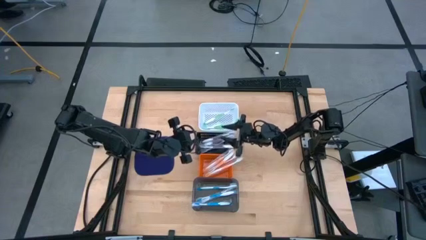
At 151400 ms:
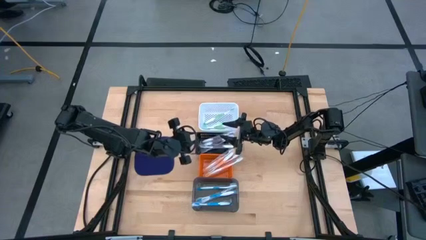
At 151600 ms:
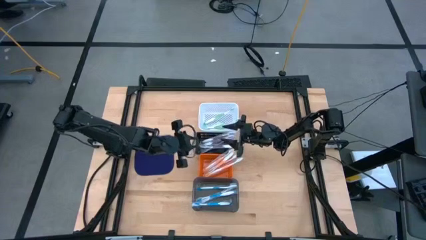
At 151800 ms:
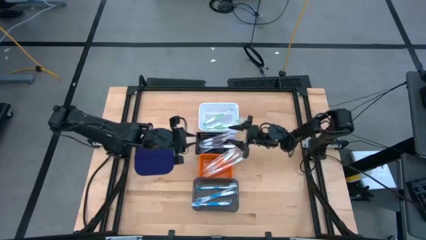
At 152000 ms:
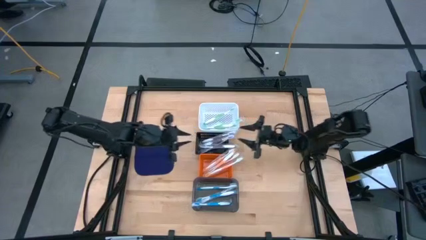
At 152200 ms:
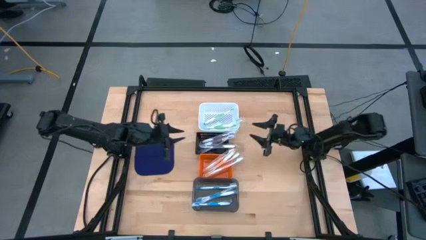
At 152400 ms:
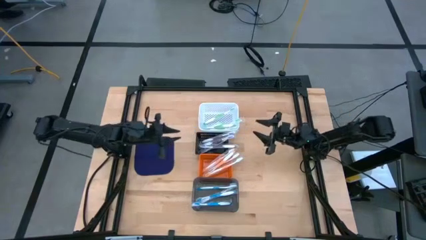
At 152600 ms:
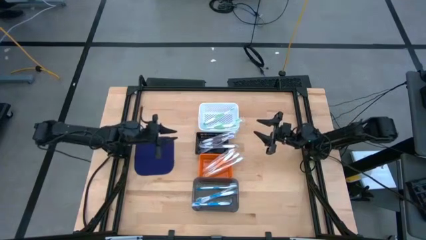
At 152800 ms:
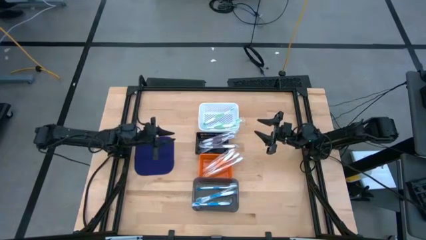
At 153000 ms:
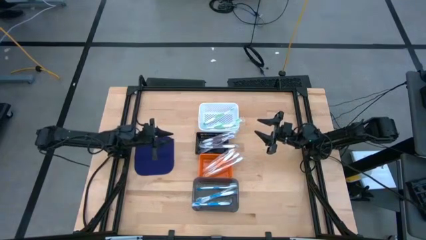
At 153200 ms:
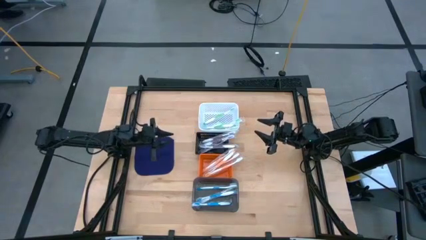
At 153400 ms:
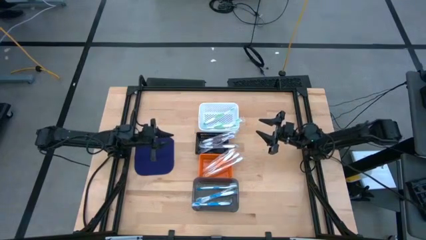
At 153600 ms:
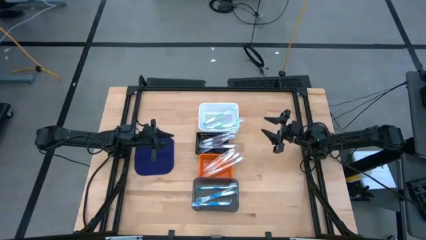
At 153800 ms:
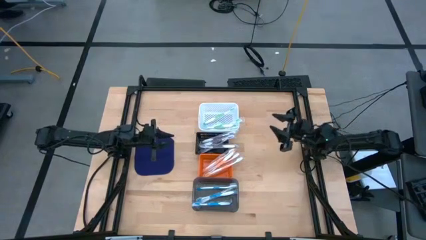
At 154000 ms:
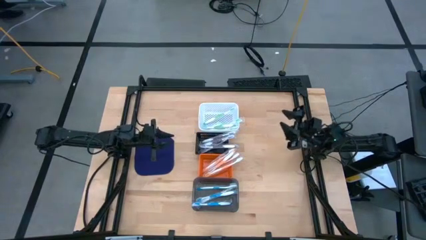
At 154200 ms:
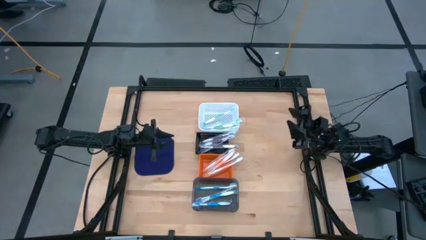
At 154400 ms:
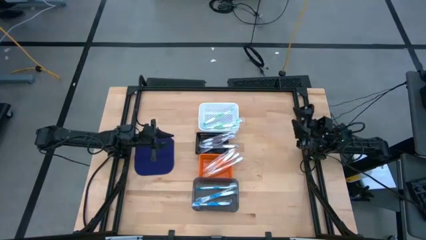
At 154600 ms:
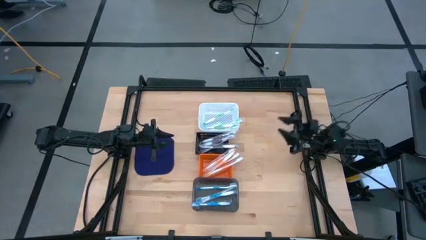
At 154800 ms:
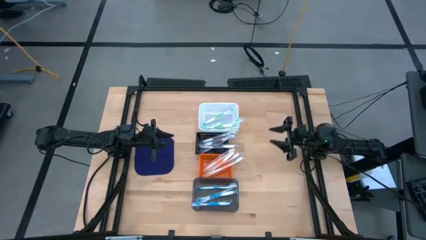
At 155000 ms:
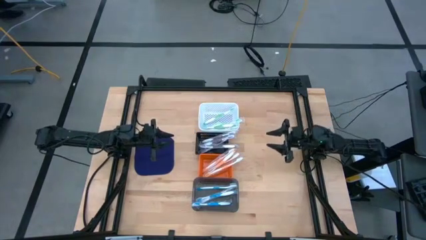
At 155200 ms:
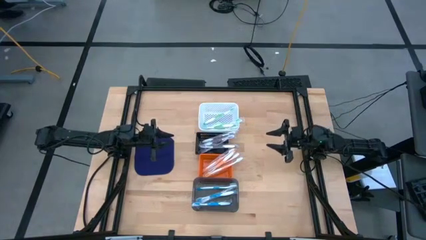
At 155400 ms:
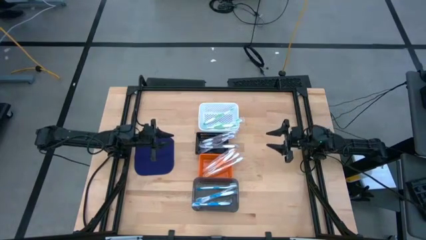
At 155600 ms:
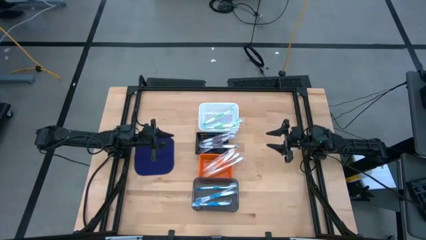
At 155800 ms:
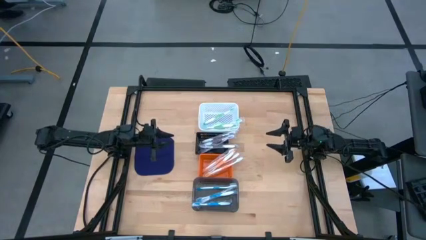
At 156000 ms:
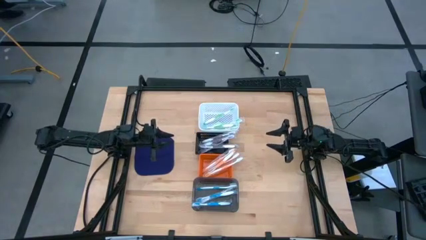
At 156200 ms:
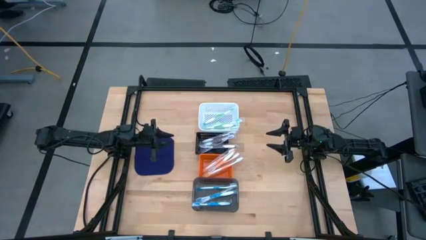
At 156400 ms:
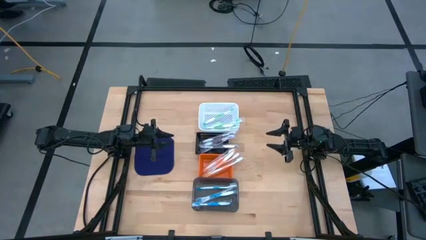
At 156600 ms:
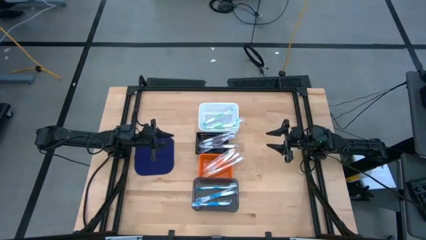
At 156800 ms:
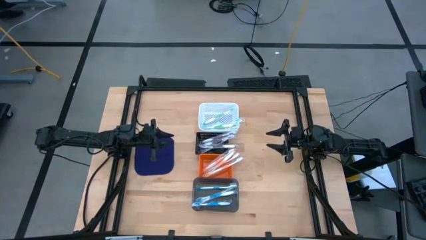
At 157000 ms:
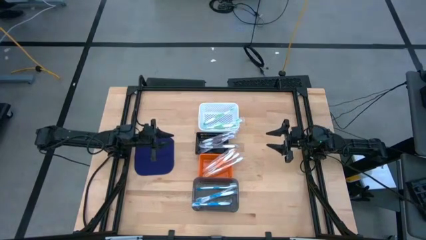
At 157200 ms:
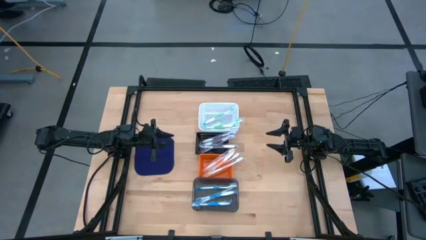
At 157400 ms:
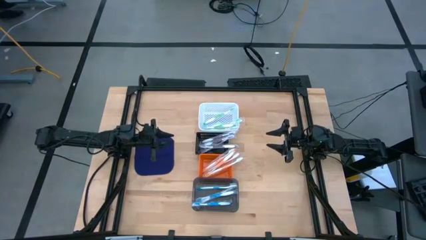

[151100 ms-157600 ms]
Task: Pick & Place Toothbrushes
Return to Home Position

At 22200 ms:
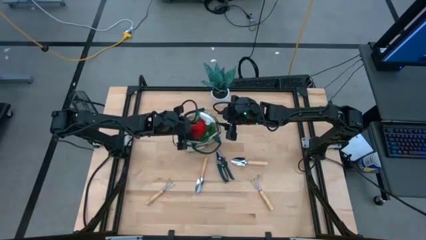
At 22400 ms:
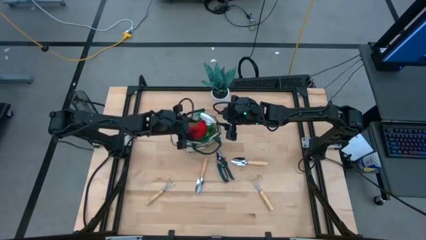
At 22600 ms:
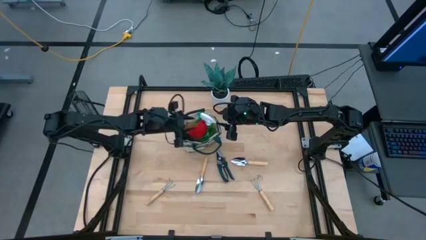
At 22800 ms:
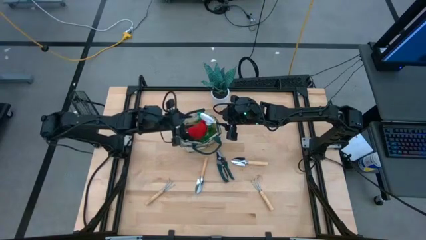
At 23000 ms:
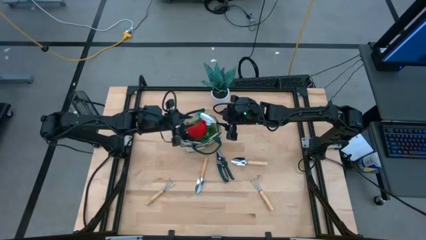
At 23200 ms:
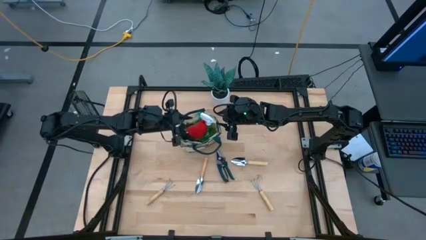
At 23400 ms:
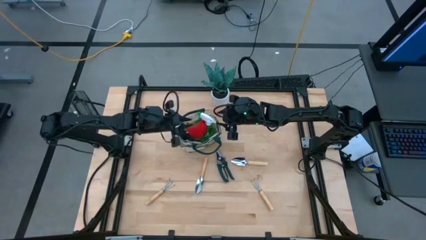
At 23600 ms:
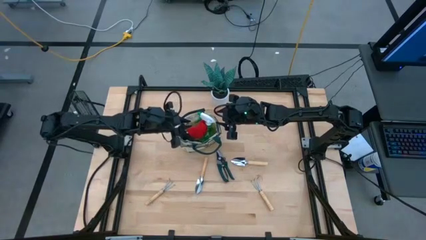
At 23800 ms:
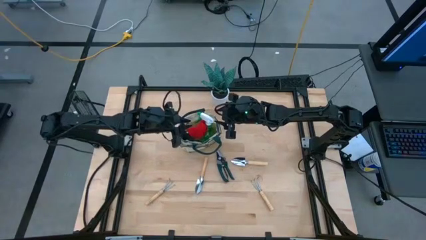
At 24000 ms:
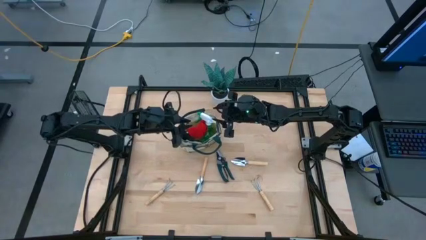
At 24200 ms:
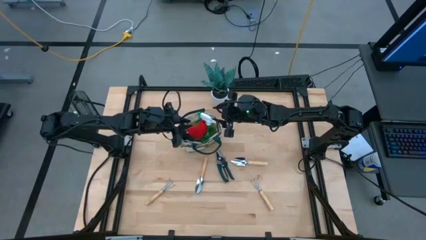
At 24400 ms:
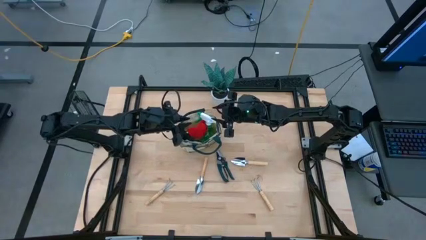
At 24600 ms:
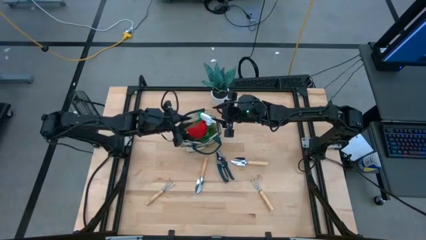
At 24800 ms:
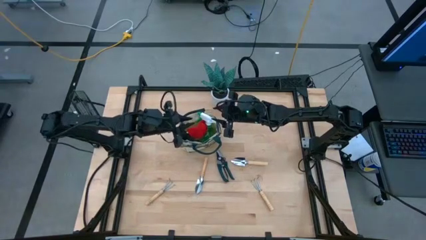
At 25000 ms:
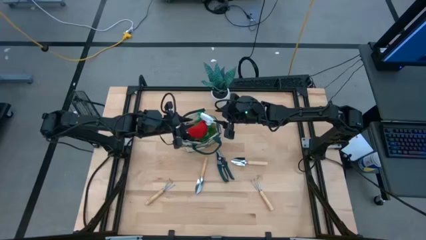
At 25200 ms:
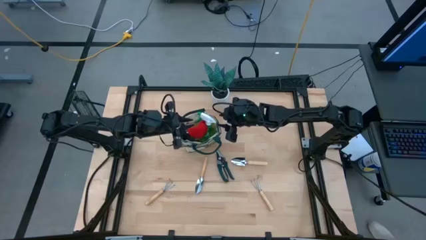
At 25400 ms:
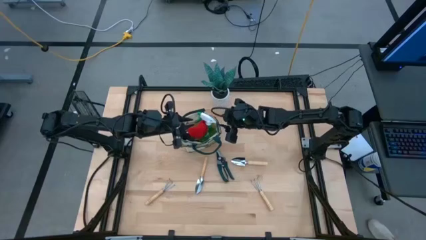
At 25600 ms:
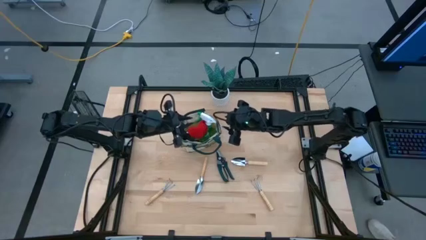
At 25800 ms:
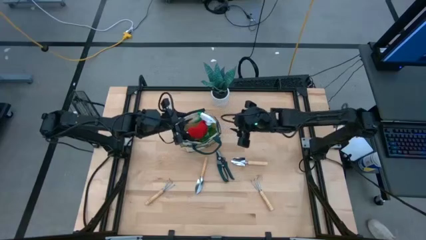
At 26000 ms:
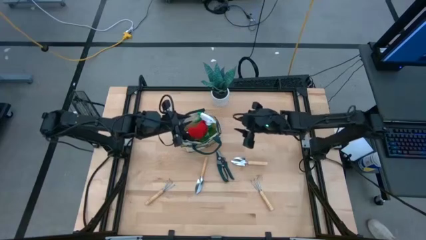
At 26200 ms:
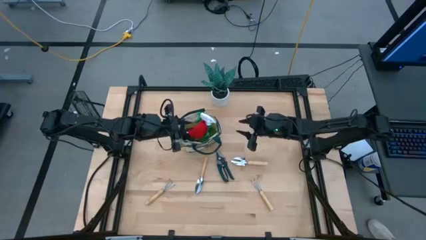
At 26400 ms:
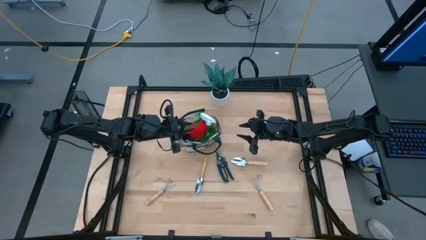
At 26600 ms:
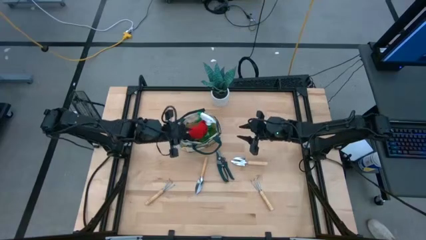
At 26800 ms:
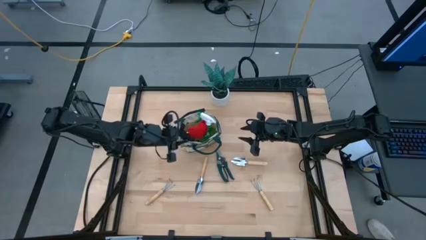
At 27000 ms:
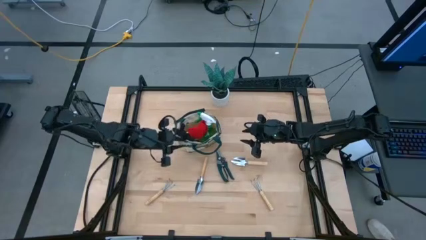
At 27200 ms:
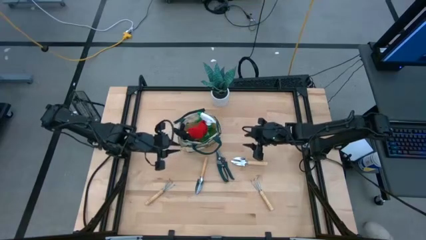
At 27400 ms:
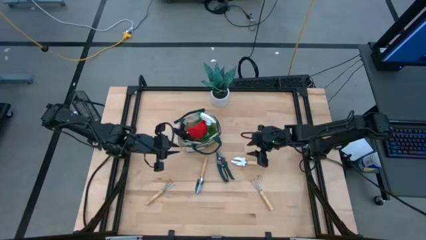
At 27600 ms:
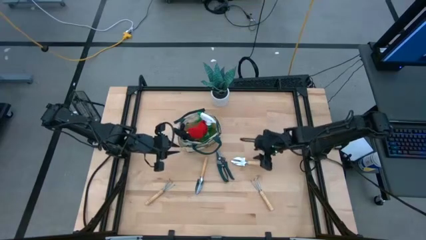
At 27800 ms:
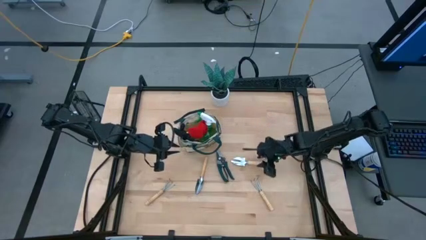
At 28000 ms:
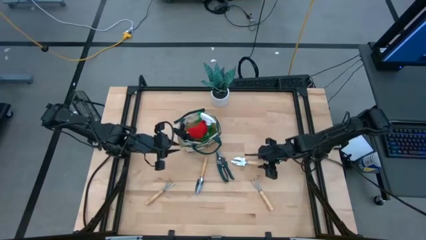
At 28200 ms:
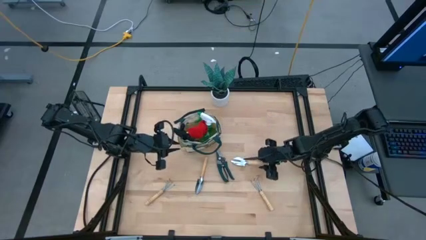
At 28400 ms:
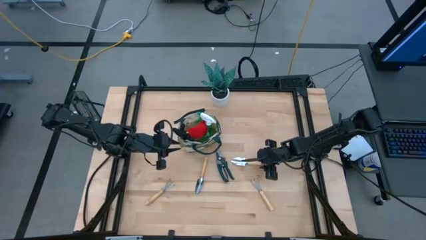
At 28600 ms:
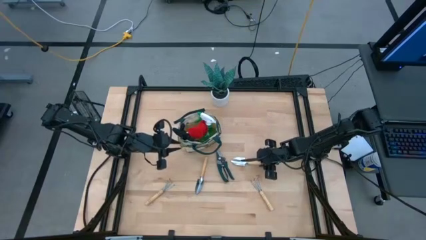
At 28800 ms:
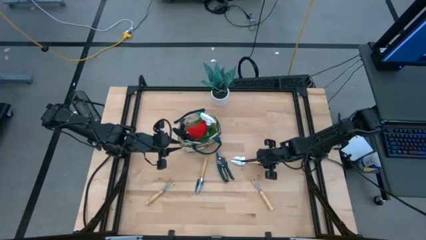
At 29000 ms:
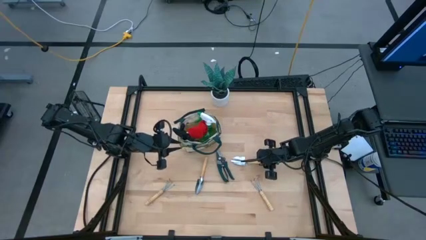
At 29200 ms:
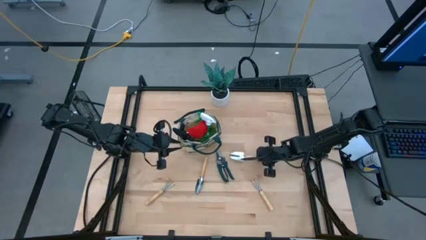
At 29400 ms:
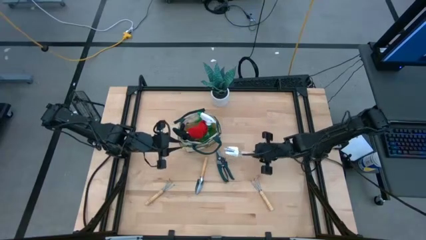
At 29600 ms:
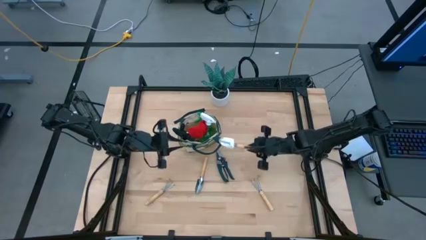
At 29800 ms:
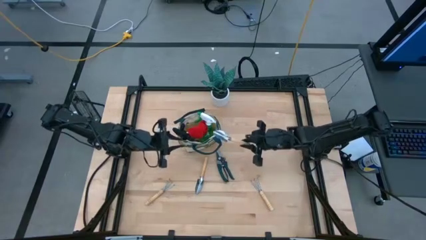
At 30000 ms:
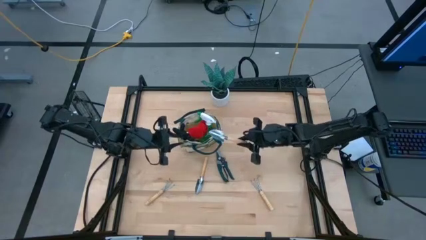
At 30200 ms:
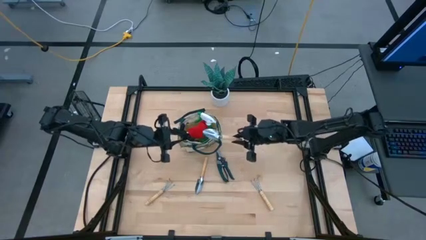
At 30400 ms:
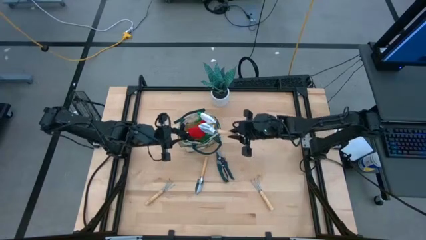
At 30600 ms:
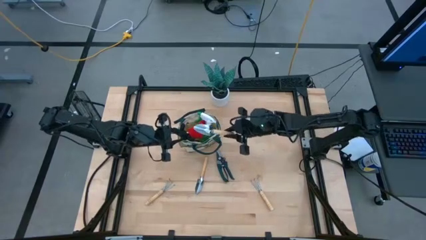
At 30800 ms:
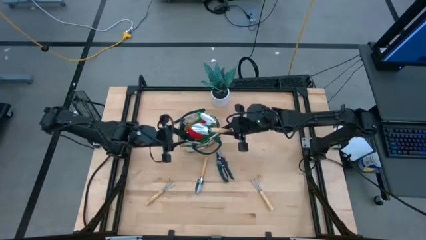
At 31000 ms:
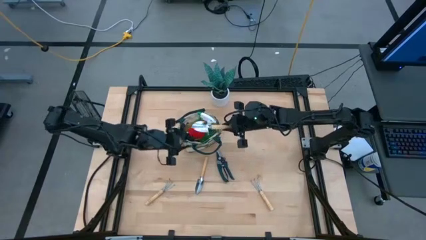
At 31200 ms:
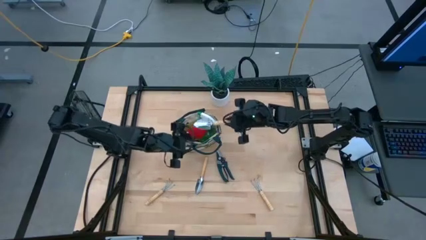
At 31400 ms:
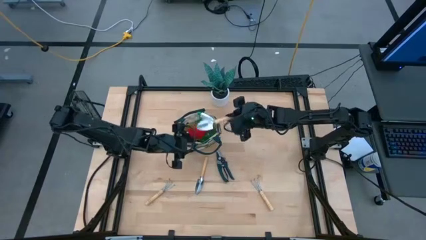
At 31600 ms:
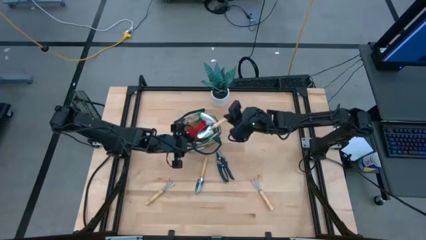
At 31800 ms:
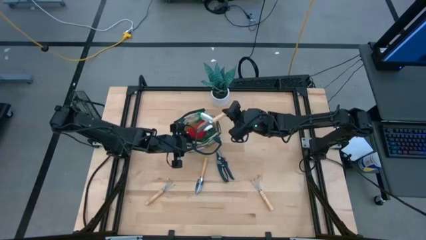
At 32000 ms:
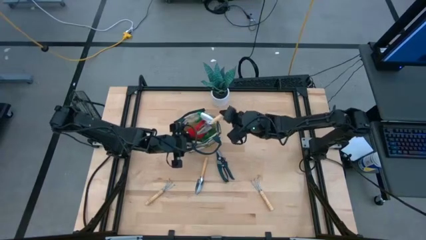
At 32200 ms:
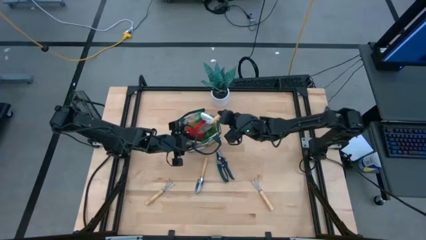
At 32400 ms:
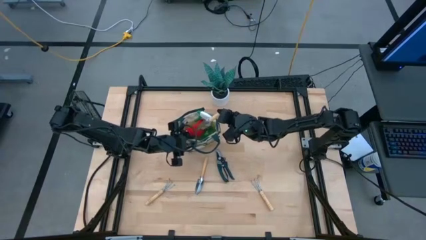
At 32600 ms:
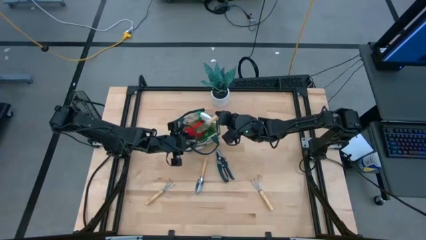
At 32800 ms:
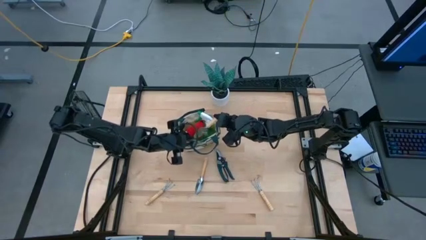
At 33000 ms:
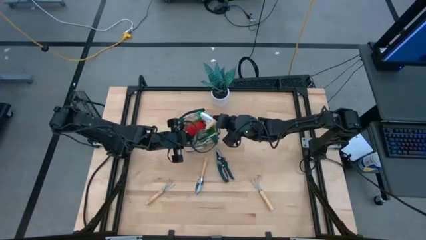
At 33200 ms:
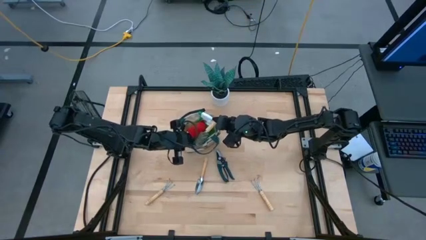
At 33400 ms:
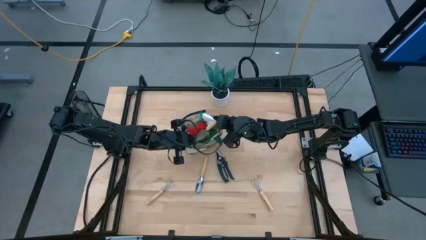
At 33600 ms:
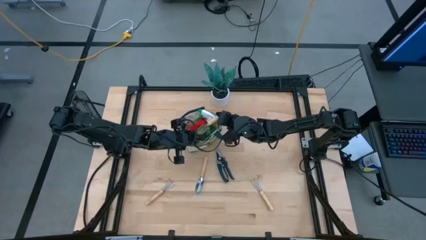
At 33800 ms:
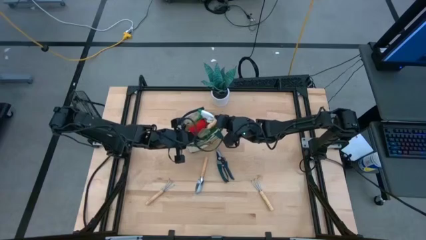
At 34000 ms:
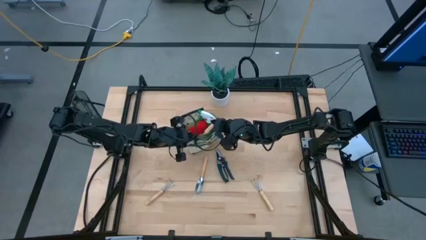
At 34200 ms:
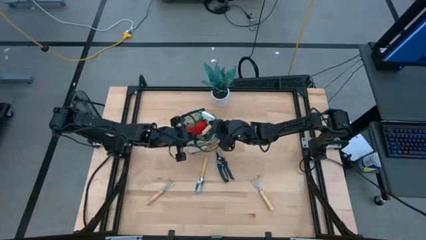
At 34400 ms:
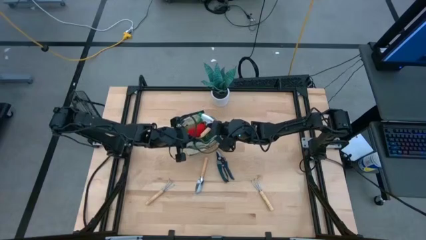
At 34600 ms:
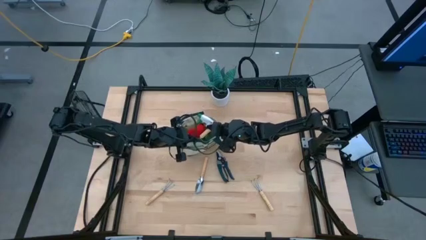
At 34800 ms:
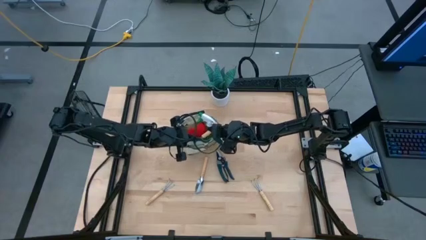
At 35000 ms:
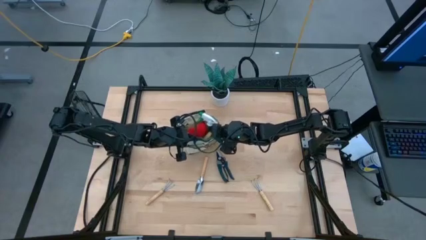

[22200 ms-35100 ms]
Task: Pick & Place Garden tools in Gardening bag
Put the right brown trowel into the brown gardening bag
